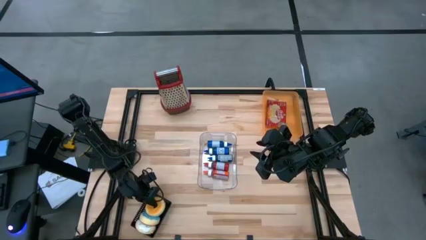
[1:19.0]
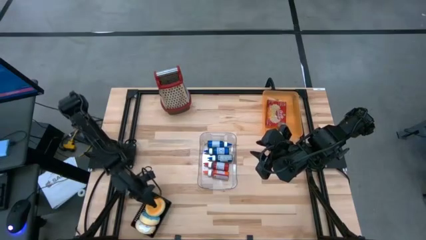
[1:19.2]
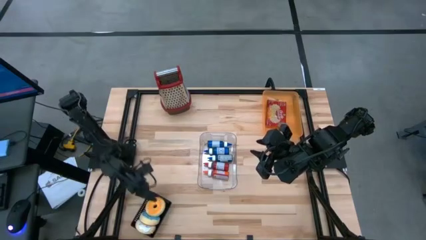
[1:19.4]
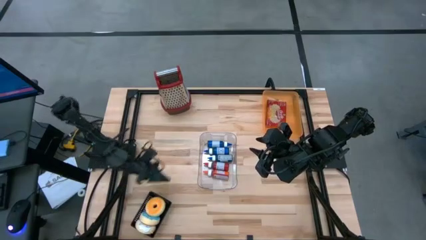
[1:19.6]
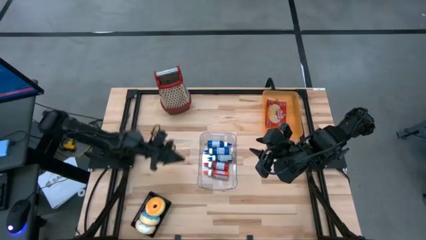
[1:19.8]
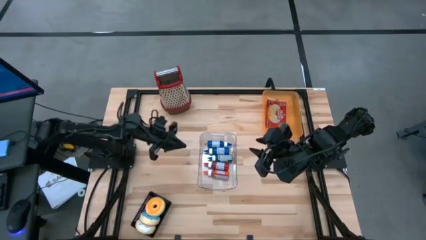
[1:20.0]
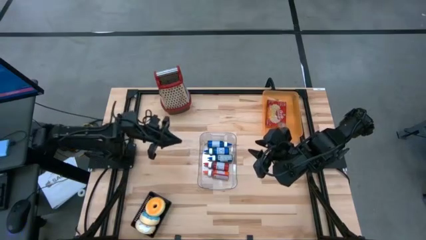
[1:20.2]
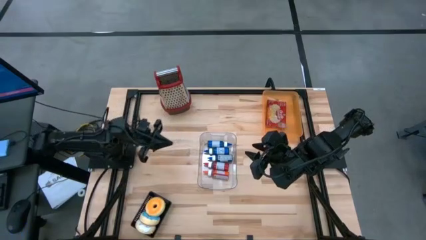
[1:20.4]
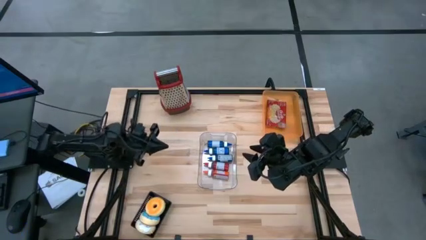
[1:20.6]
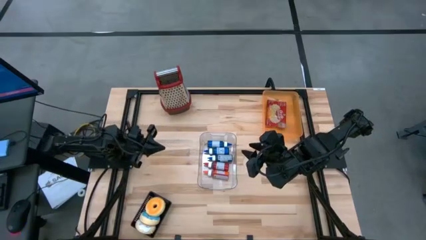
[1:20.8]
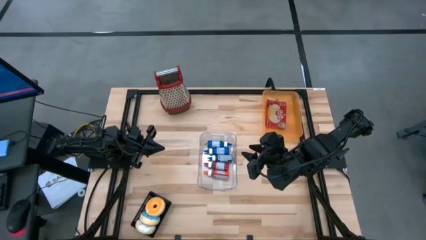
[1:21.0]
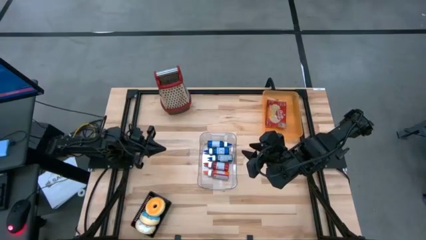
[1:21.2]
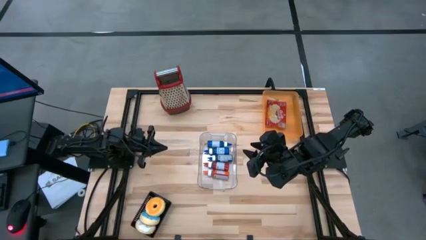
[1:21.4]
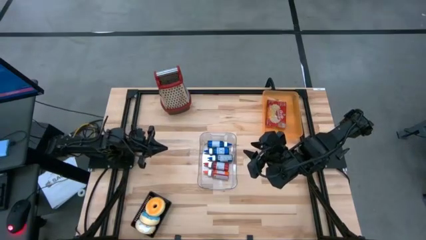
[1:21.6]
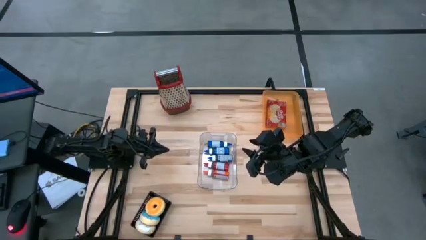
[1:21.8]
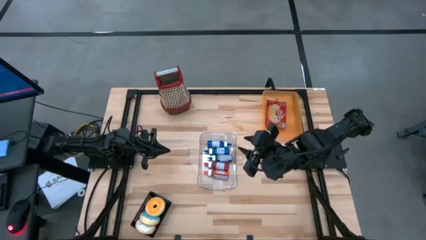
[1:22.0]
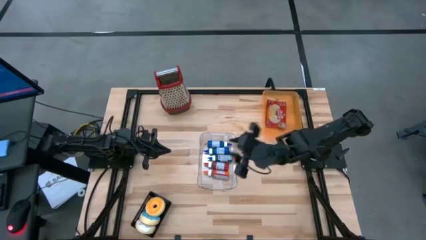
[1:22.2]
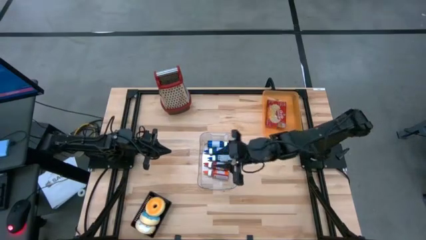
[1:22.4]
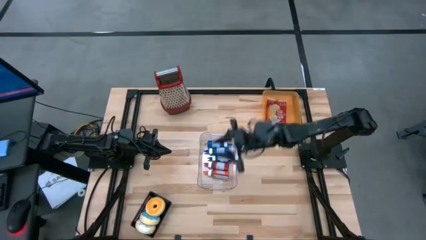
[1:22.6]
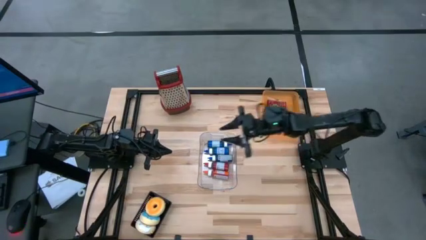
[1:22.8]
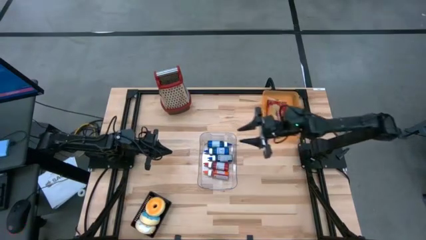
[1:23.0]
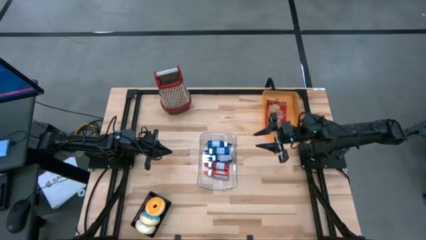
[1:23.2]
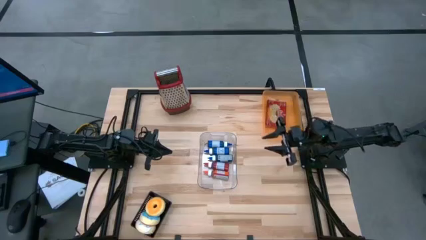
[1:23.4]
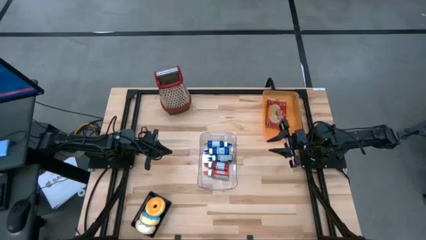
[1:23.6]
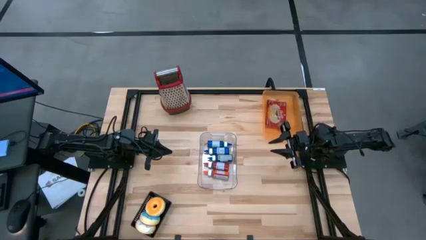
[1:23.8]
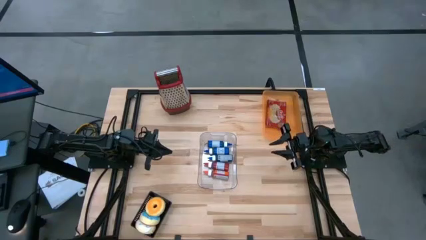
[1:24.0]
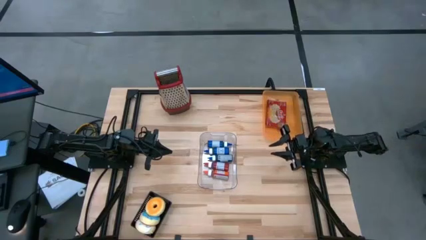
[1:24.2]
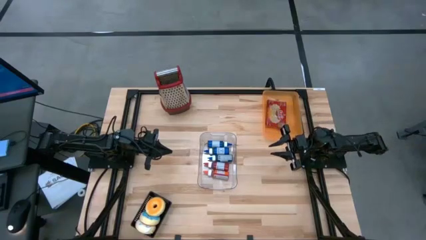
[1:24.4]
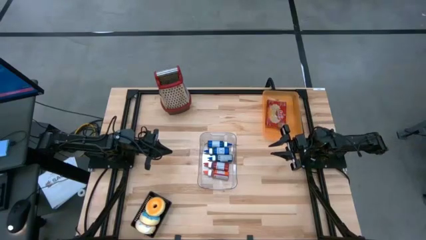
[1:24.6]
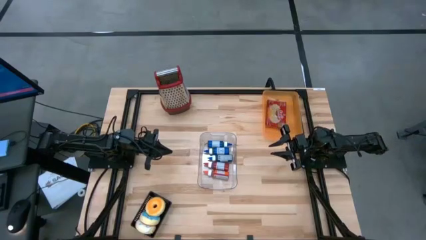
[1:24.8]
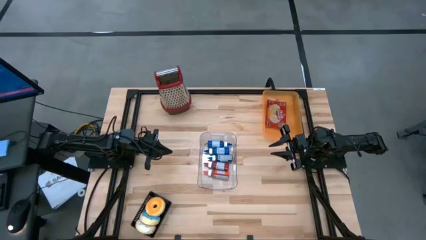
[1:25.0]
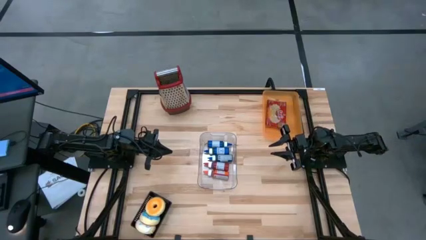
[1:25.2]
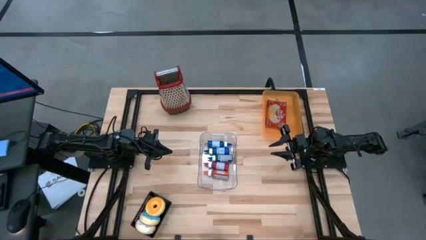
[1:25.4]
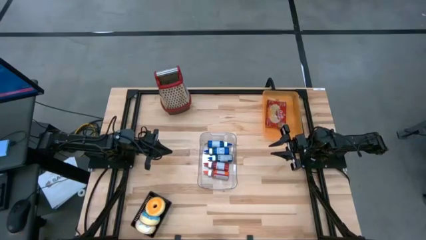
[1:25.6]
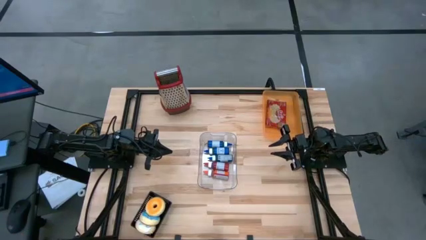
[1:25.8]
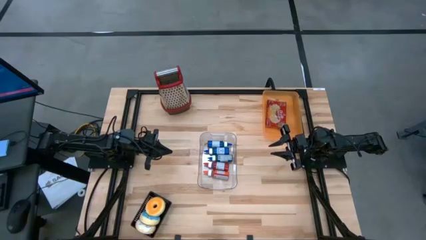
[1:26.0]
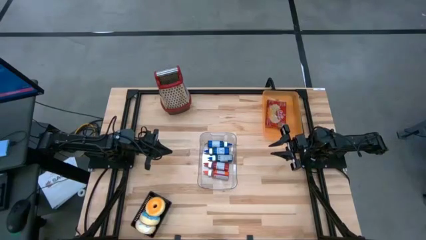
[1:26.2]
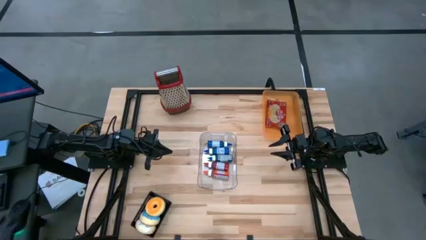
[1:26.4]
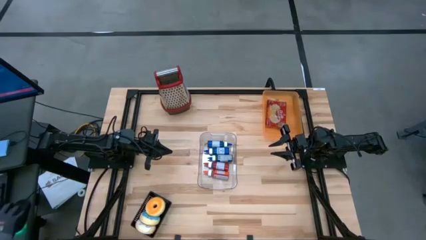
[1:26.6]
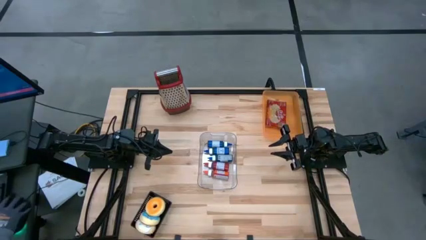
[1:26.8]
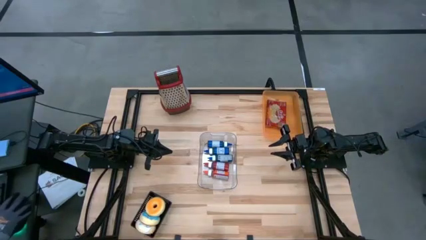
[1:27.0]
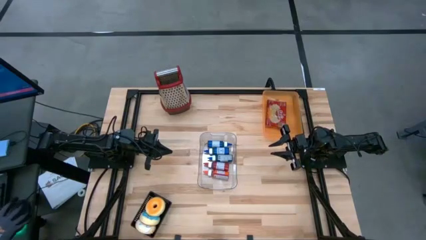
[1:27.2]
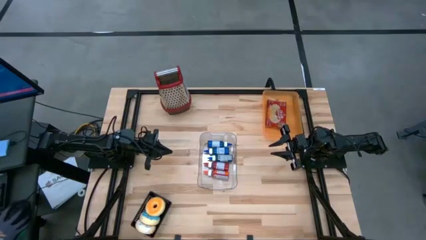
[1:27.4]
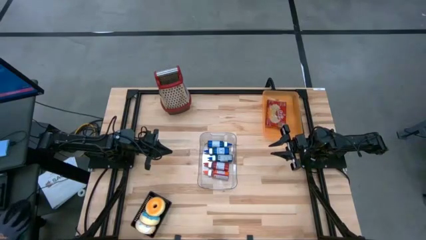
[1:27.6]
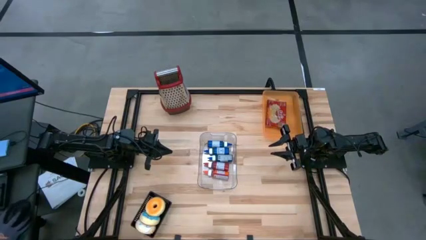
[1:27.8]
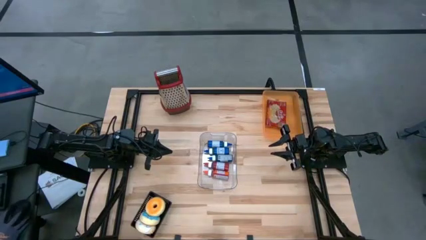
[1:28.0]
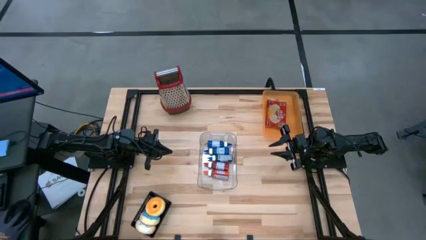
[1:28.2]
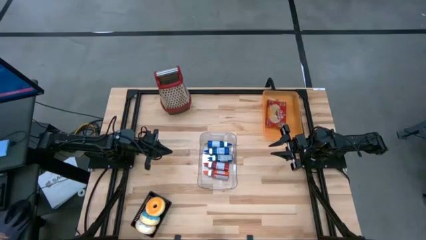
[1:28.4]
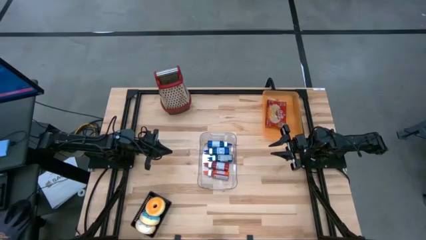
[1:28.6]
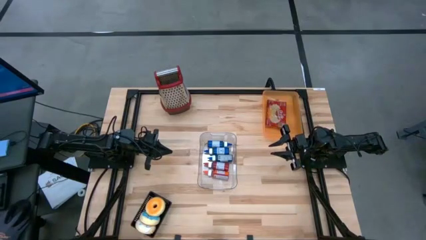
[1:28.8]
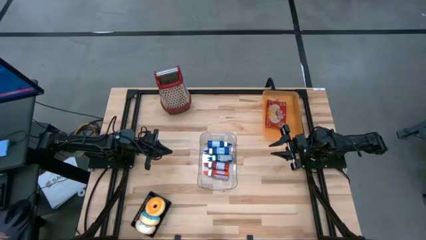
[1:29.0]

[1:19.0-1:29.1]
Return to Home Position

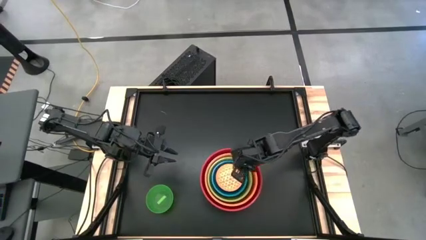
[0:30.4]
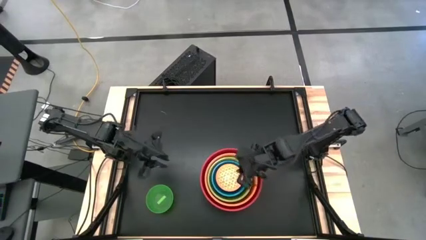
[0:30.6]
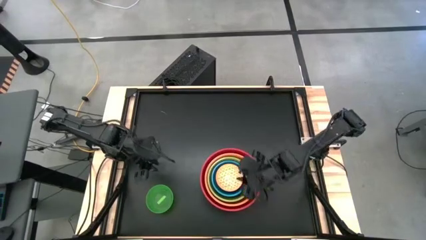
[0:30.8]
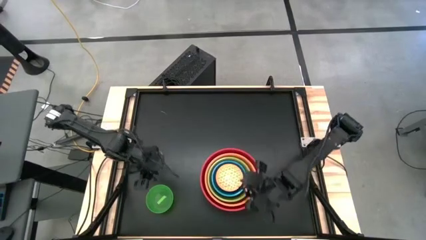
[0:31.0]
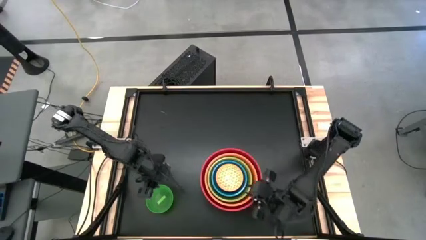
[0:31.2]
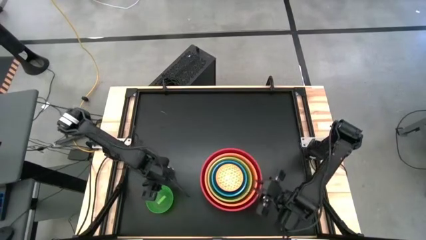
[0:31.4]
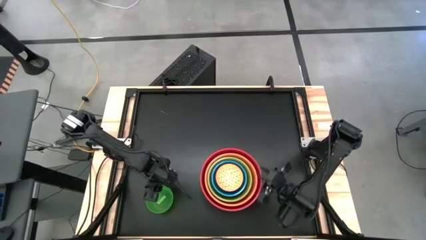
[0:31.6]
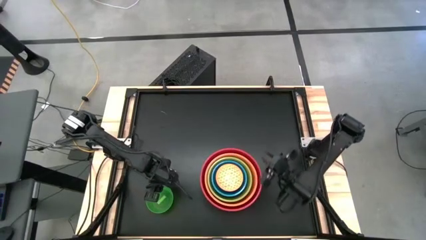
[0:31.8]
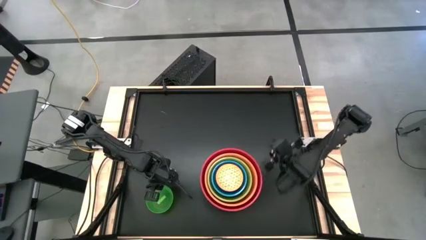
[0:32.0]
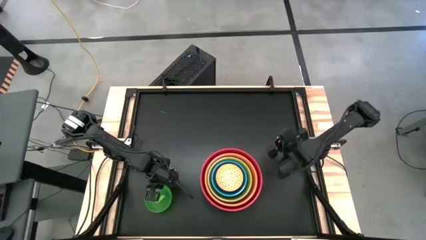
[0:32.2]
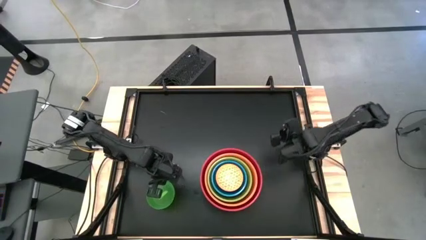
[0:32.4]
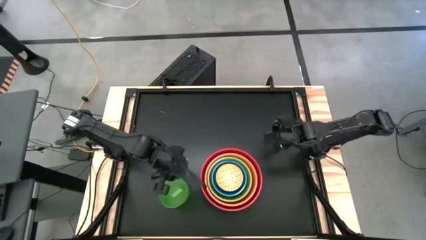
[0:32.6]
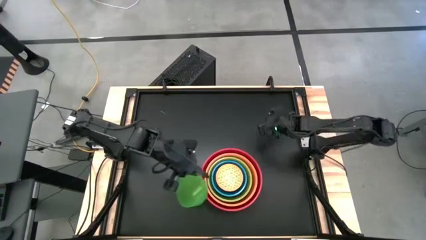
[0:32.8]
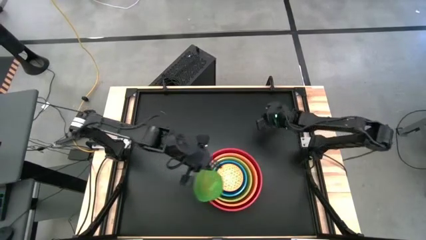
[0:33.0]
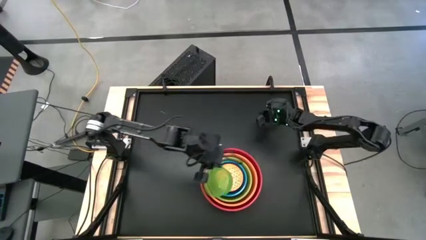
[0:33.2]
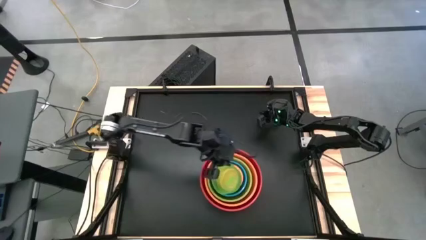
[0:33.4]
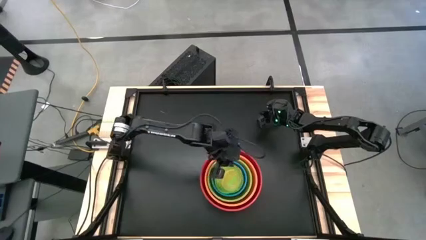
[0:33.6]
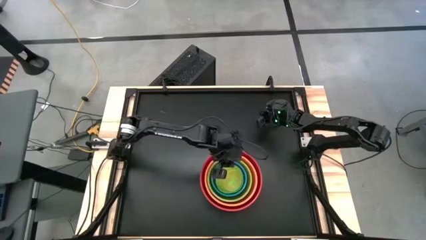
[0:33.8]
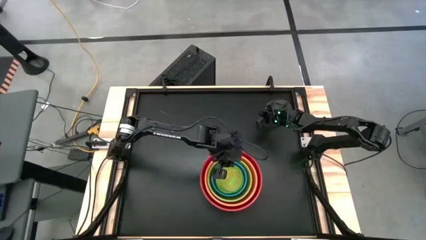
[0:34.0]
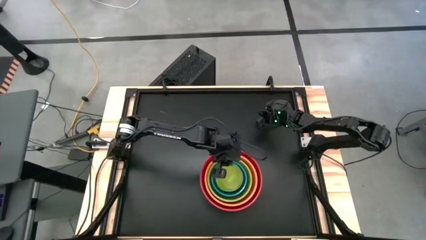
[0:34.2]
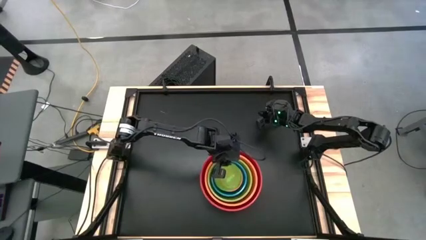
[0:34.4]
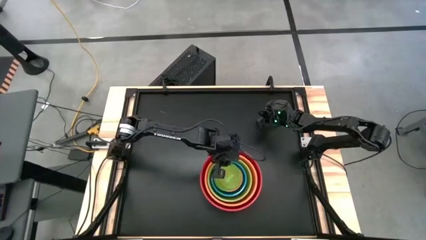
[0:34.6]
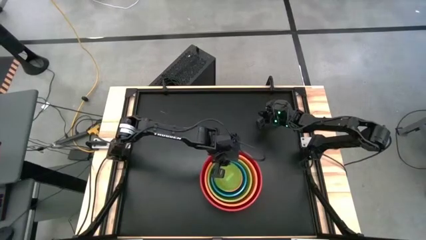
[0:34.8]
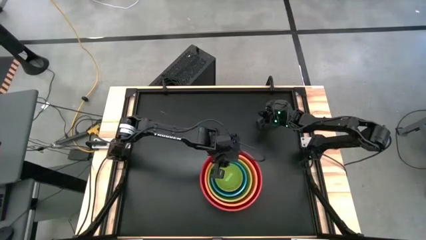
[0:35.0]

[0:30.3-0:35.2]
Stack the green bowl on top of the orange patterned bowl
